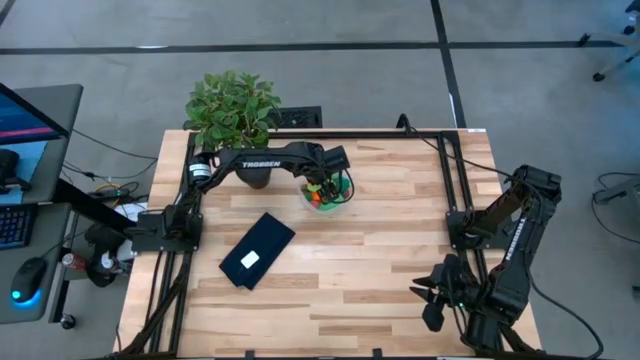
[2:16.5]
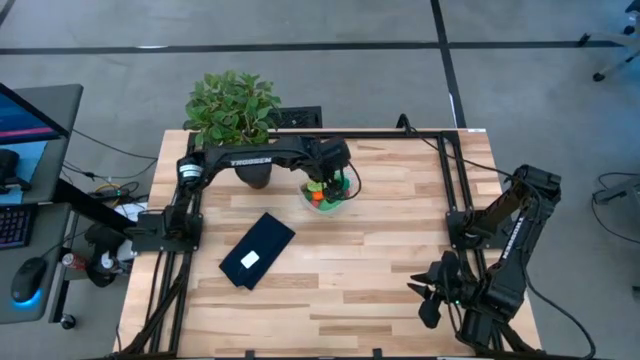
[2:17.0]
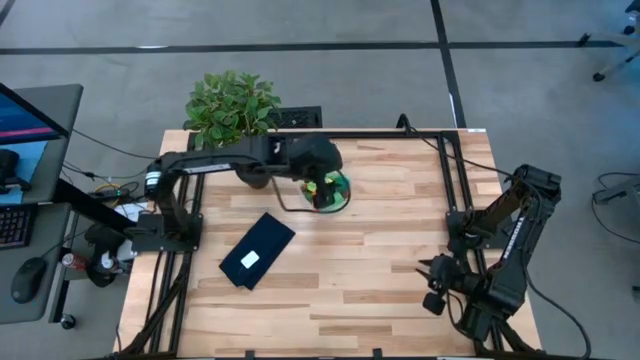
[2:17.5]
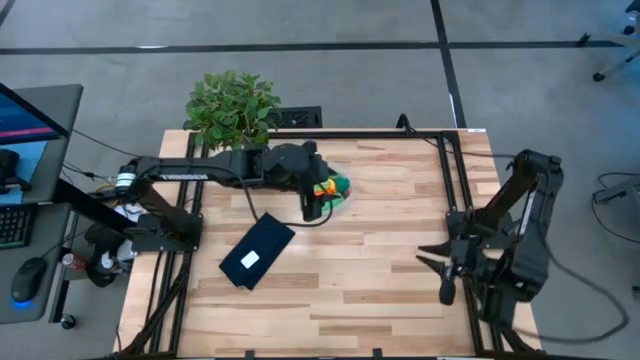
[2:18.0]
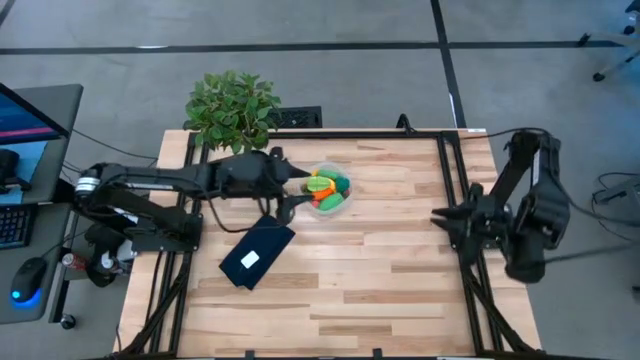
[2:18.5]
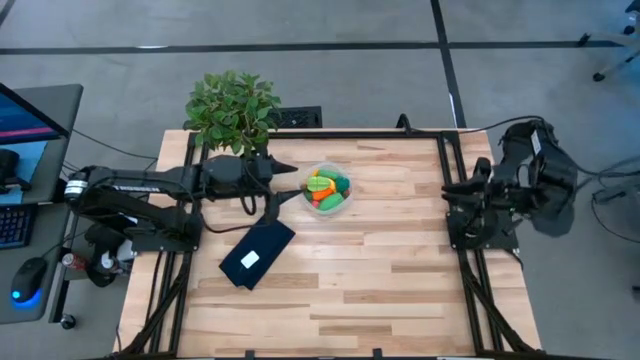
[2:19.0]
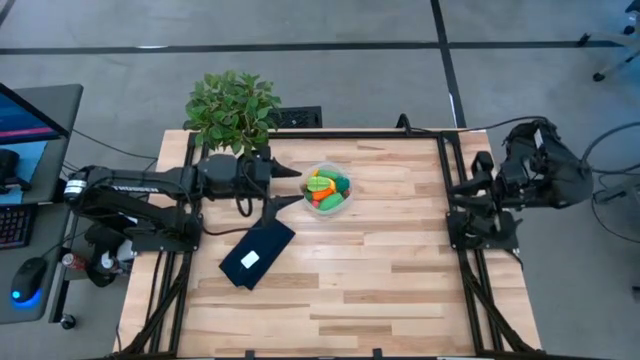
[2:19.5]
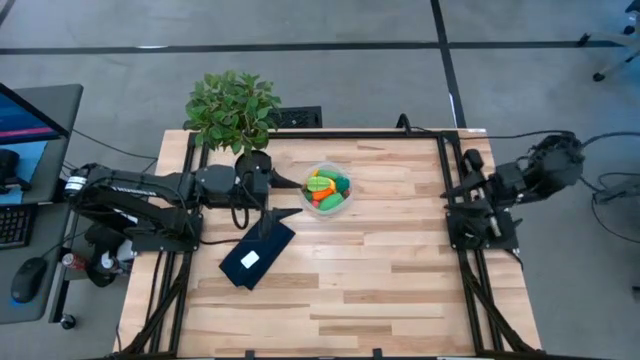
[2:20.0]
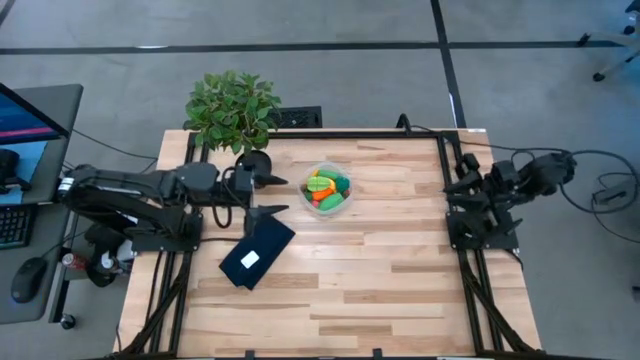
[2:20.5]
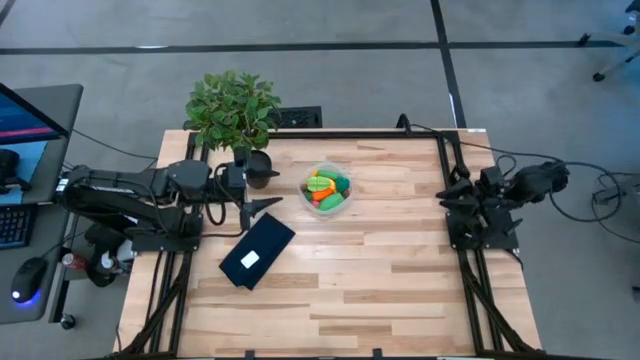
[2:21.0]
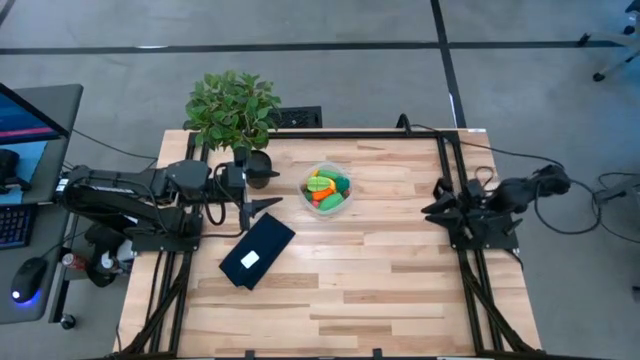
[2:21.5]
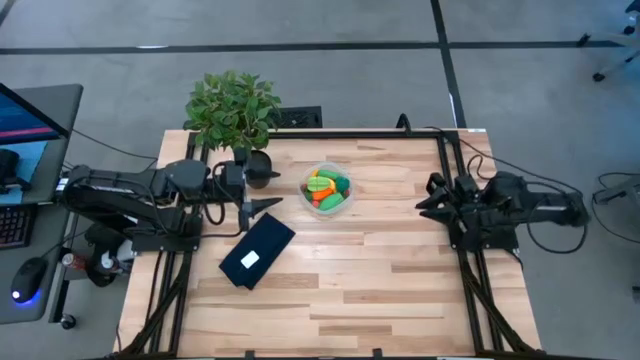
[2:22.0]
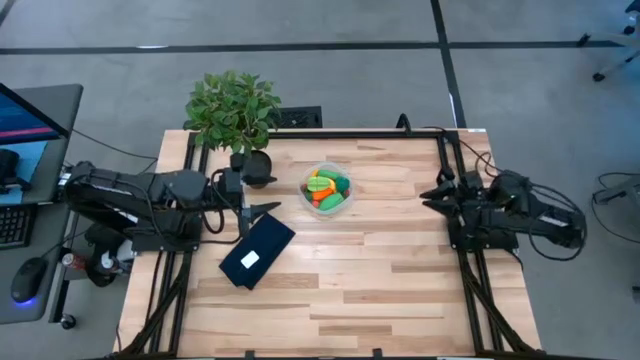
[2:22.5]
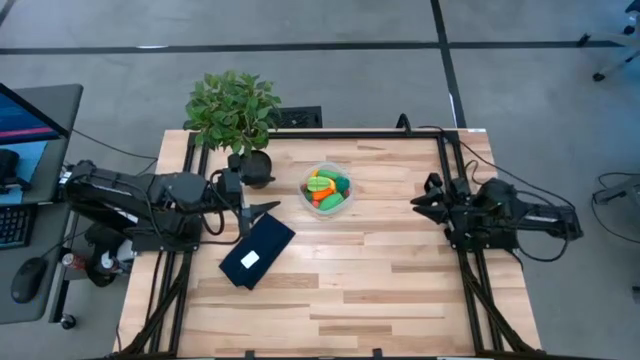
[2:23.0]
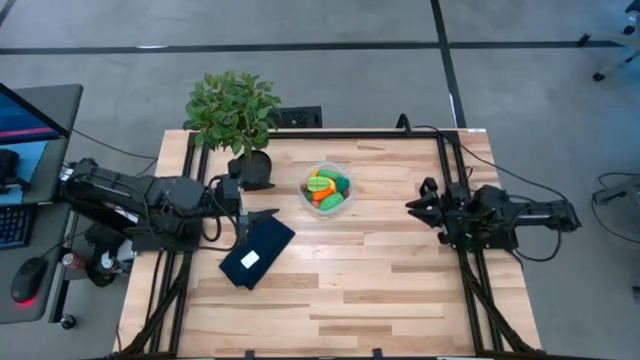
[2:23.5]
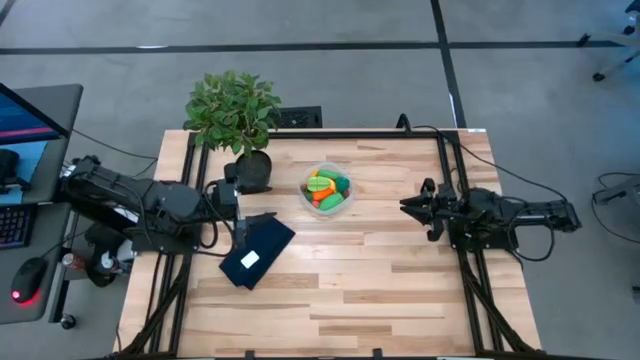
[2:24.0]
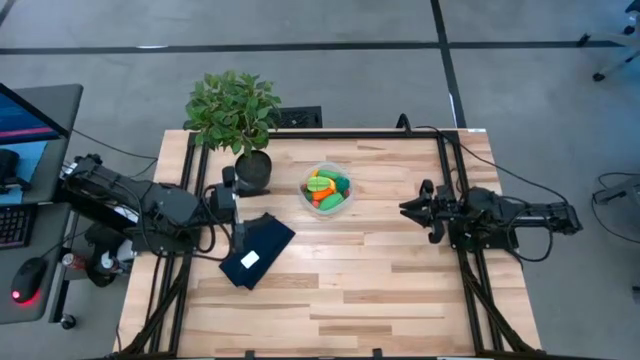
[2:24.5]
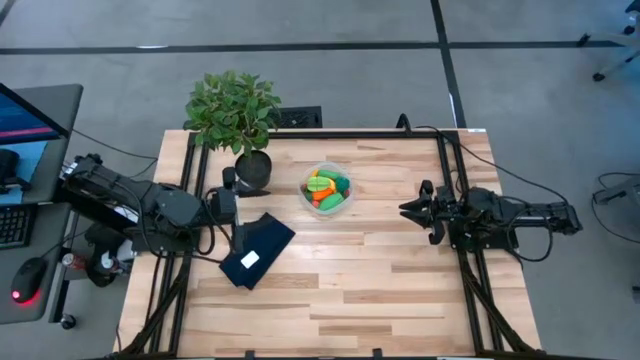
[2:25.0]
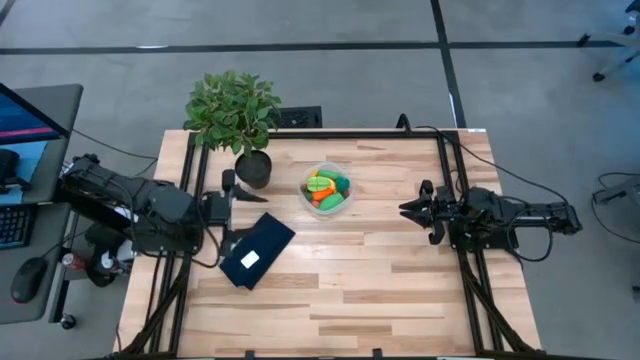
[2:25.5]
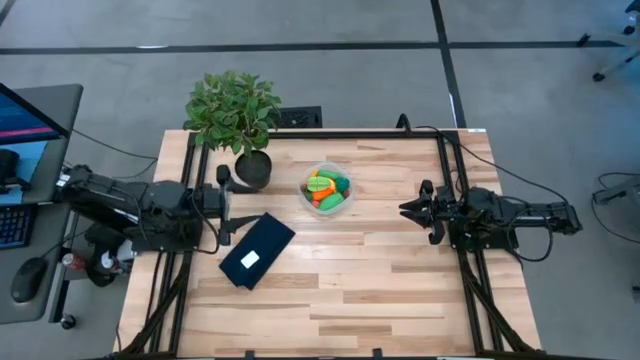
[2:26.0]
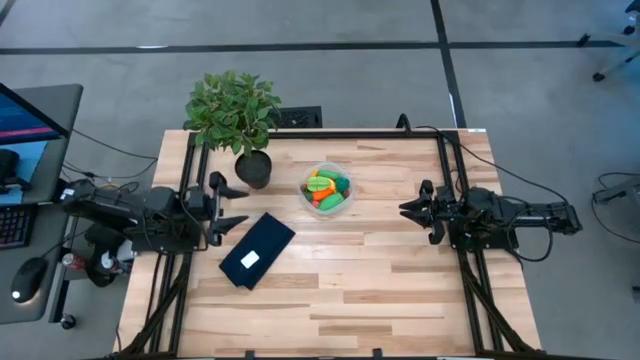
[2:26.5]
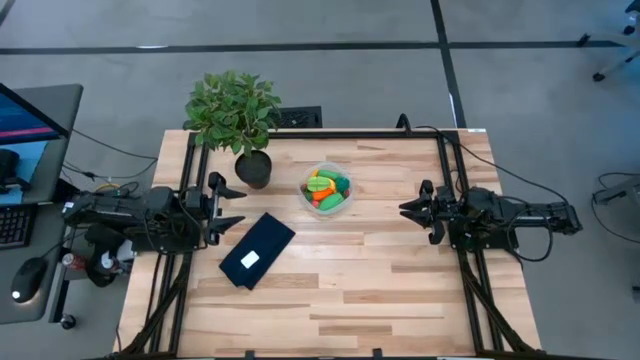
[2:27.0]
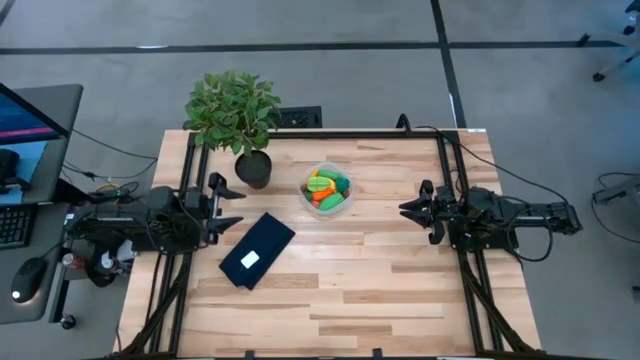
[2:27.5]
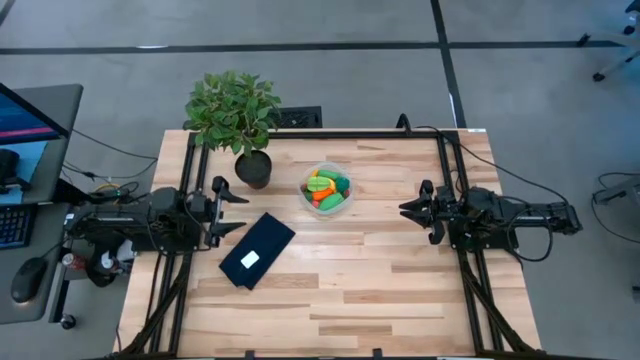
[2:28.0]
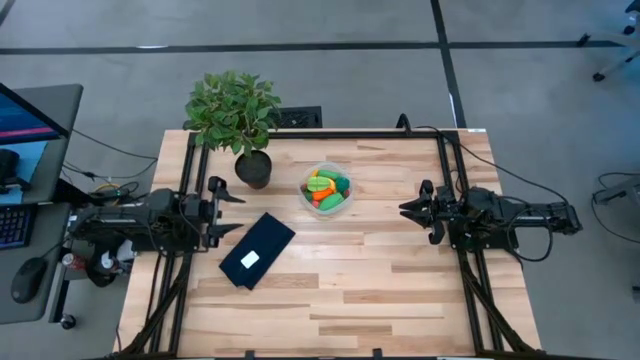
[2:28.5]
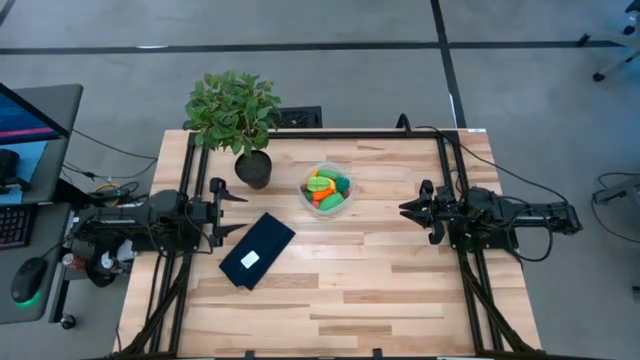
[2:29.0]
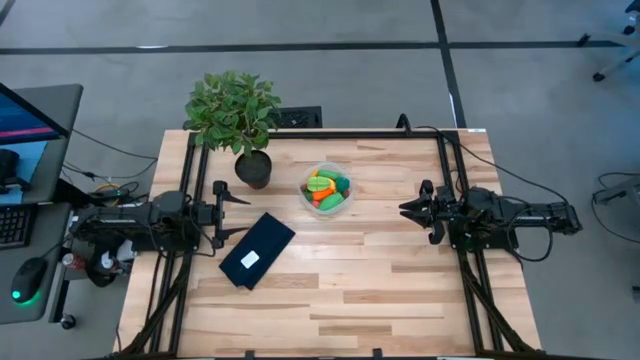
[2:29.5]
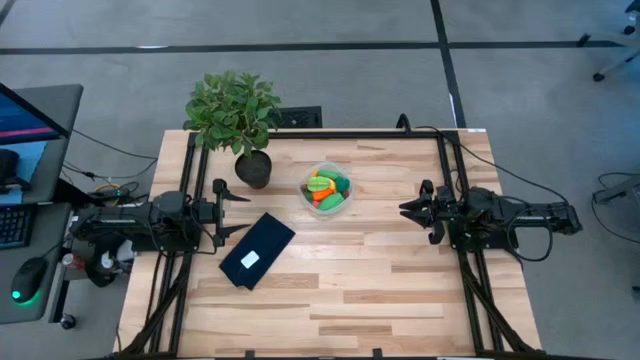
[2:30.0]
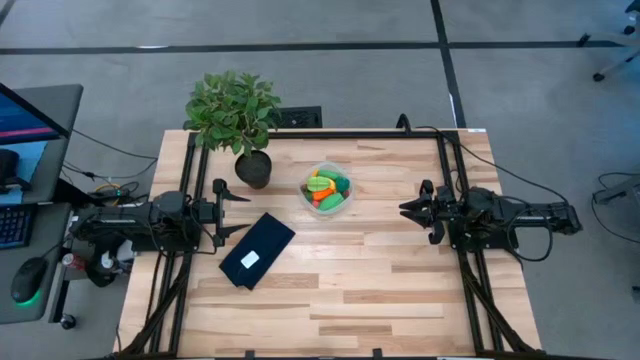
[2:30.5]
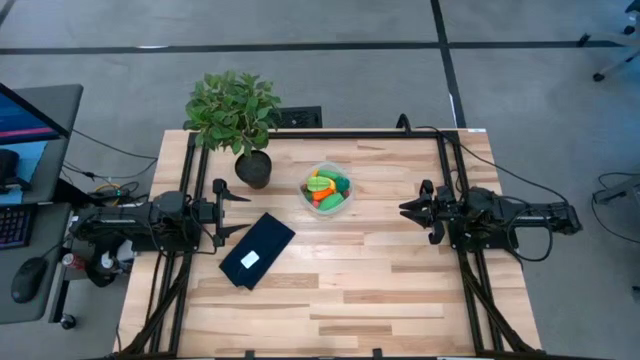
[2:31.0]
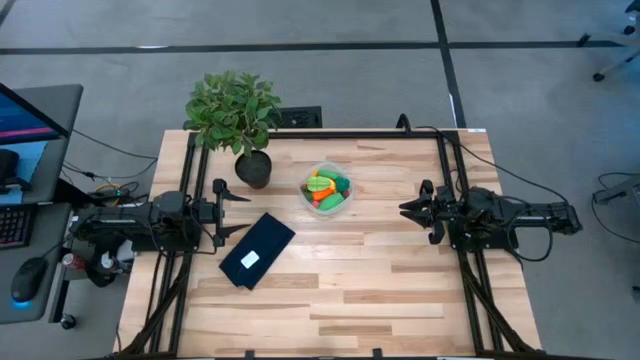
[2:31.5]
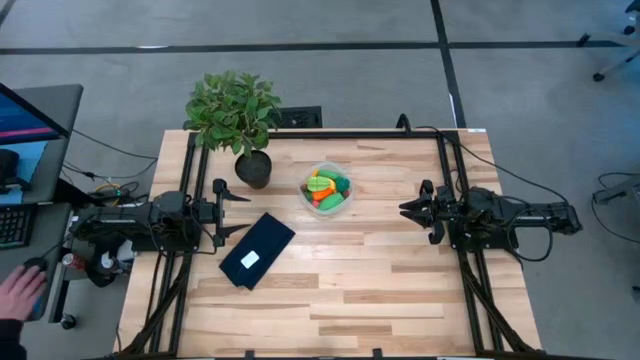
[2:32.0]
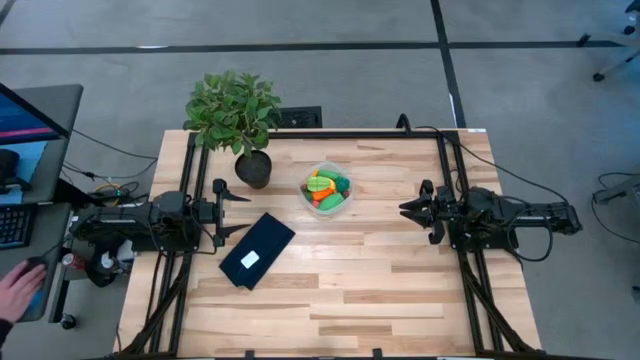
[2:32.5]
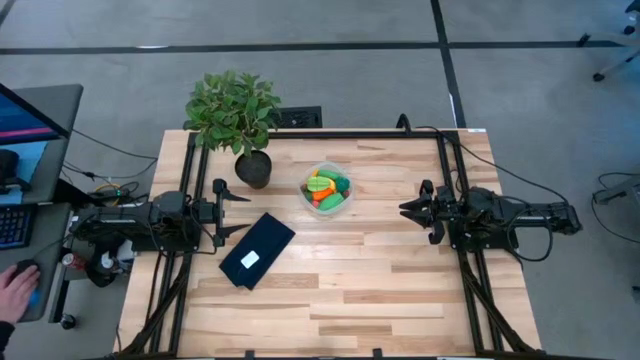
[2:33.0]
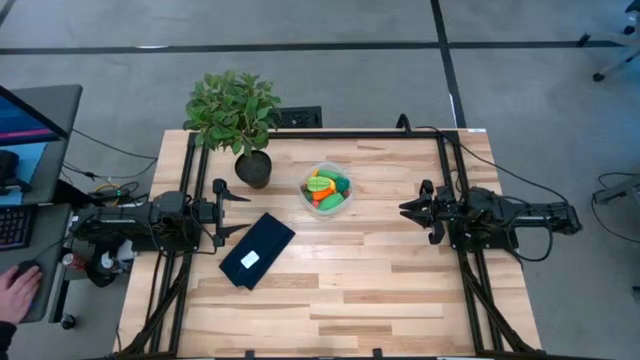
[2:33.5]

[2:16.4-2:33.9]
Task: Pick and placing Produce into tupperware
Return to Home Position

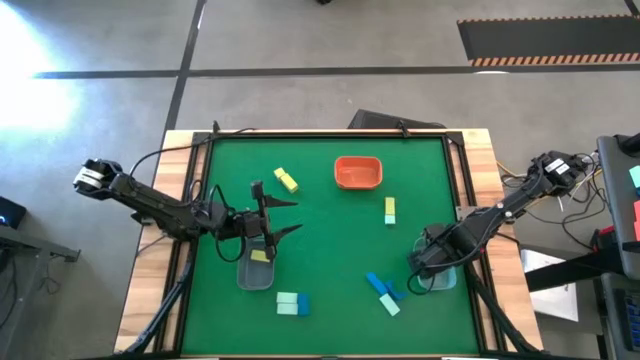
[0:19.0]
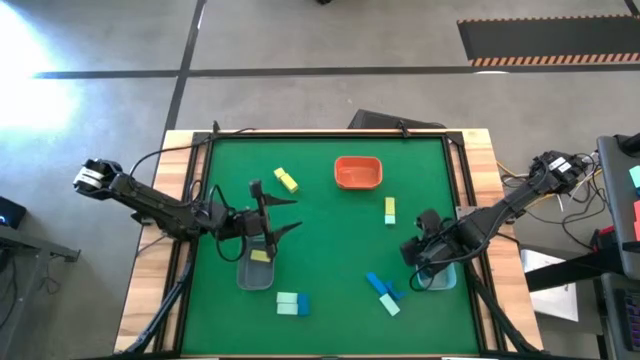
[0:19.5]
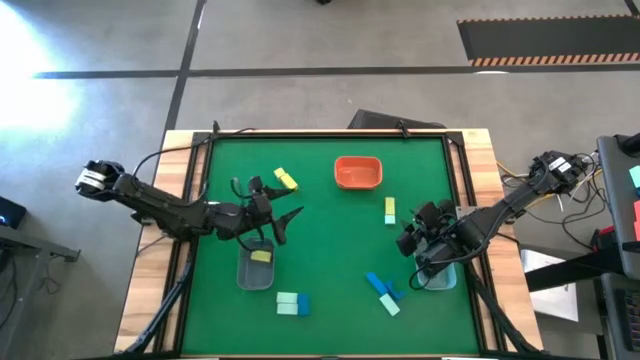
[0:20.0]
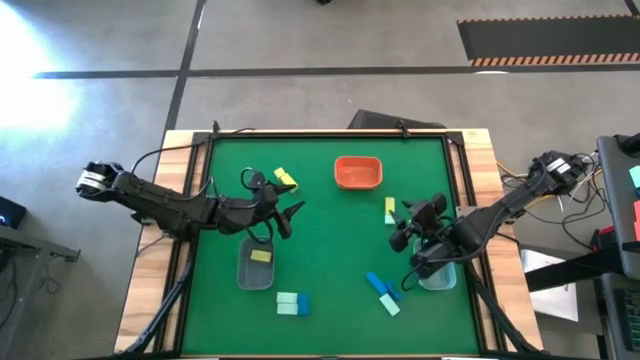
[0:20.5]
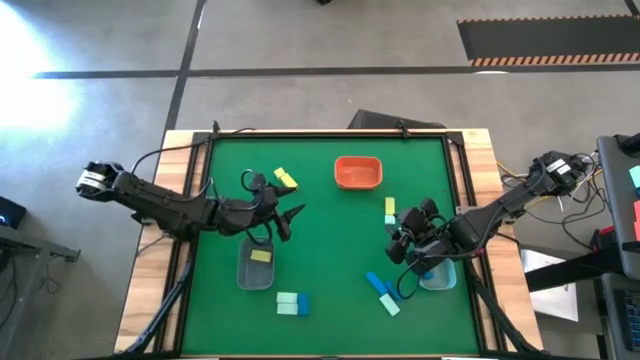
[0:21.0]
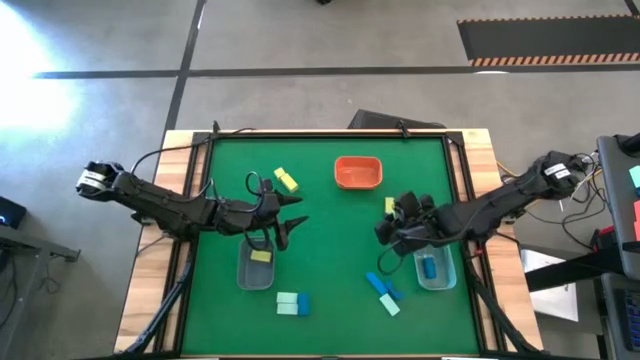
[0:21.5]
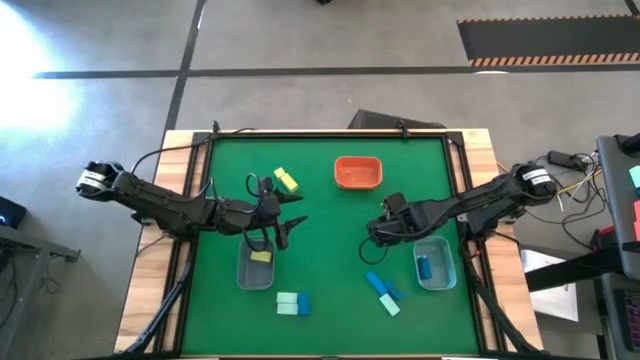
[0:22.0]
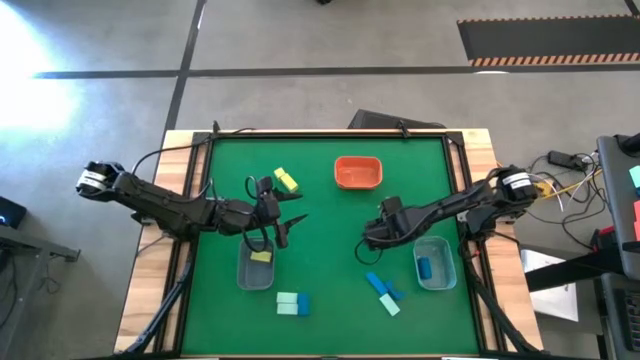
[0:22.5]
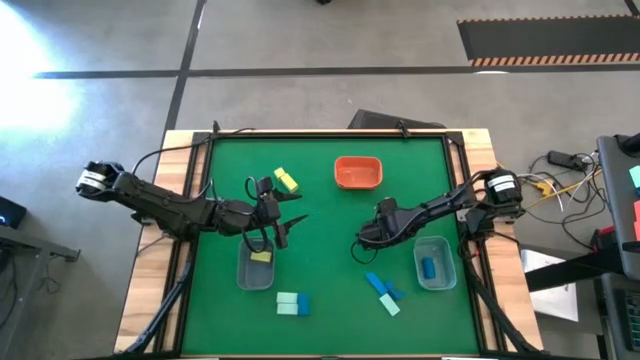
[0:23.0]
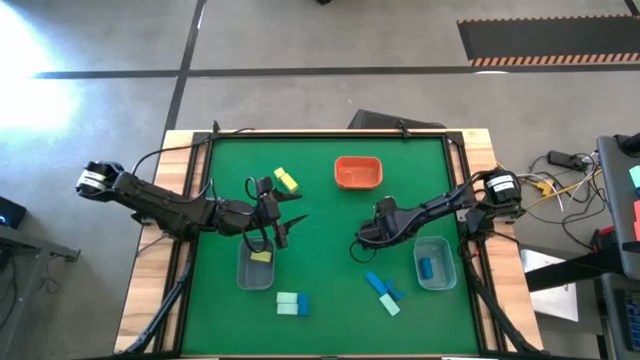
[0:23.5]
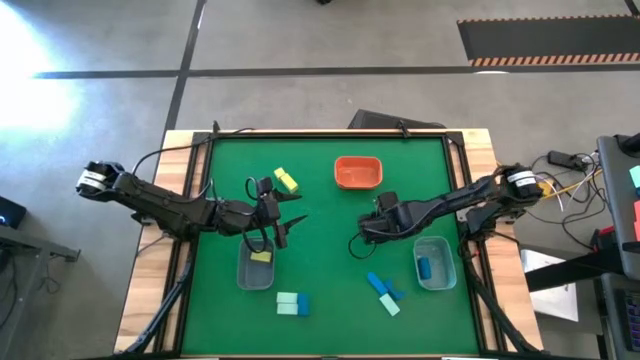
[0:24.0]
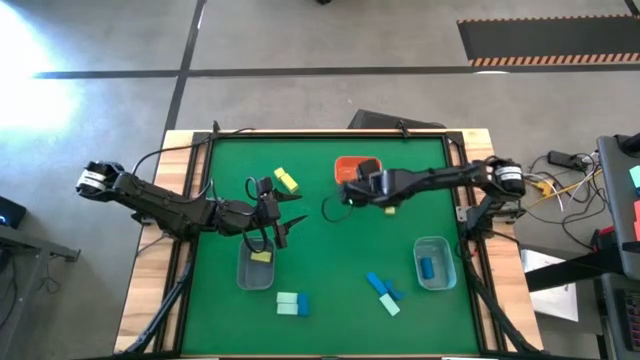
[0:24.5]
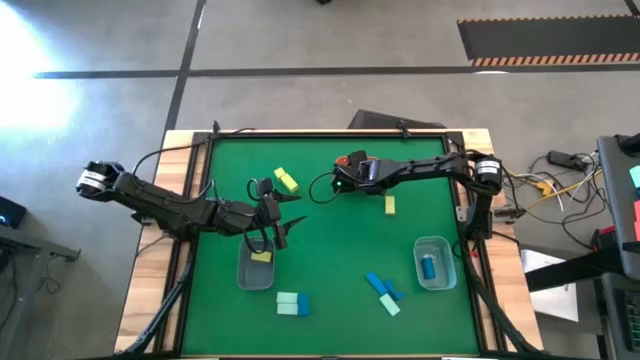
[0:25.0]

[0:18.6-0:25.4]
Task: Sort & place blocks by color
Put the light blue block into the orange bin
